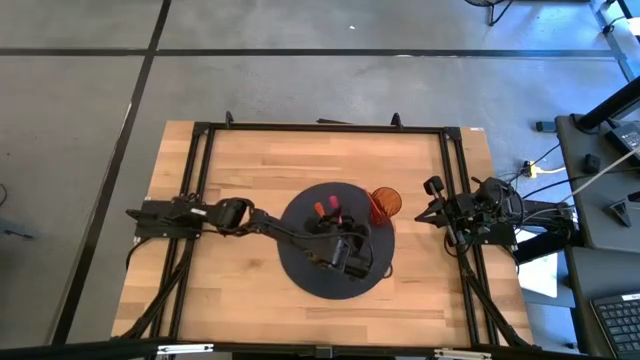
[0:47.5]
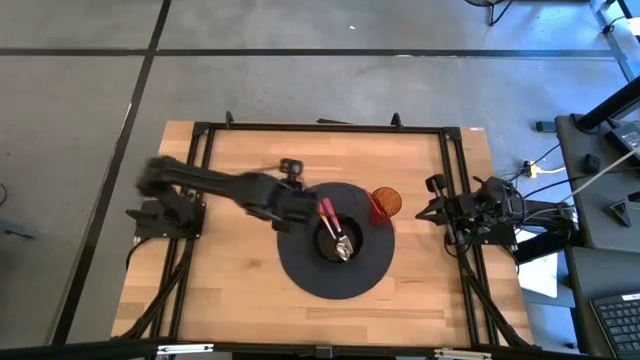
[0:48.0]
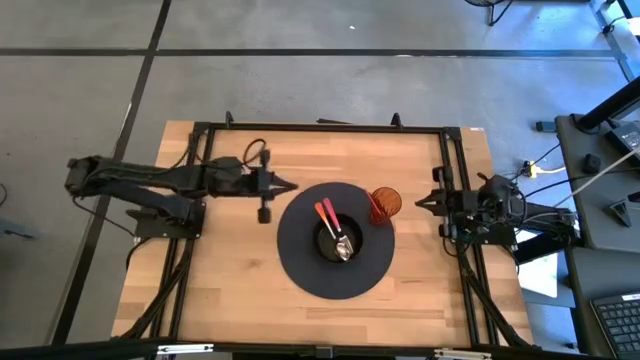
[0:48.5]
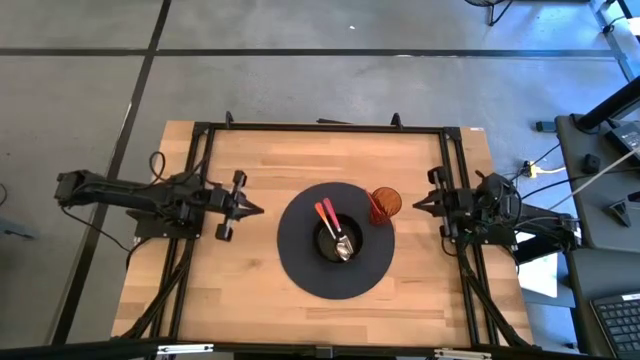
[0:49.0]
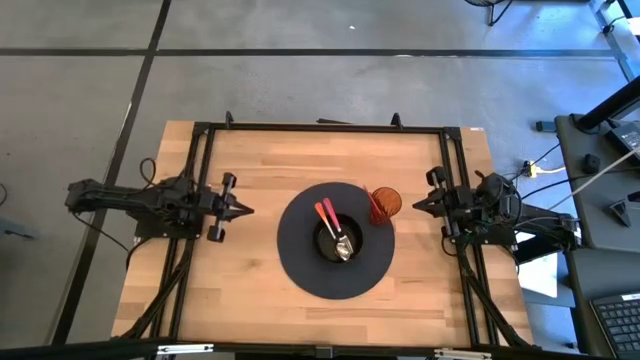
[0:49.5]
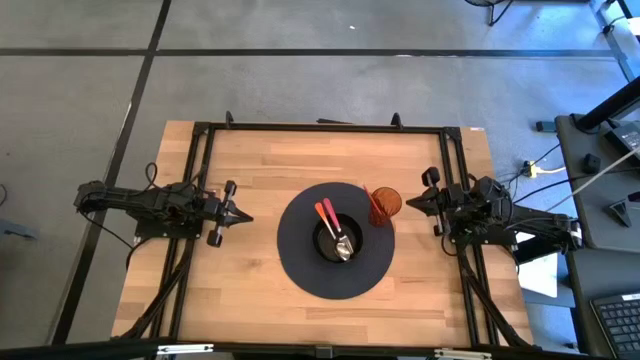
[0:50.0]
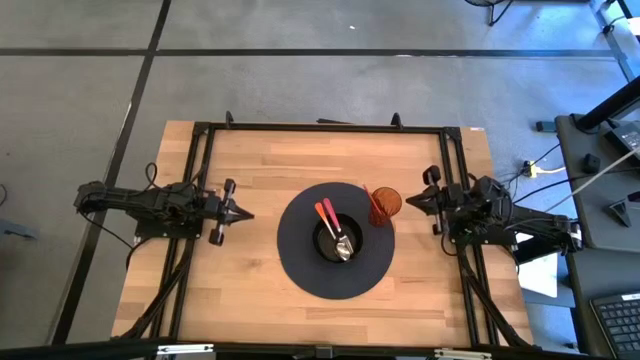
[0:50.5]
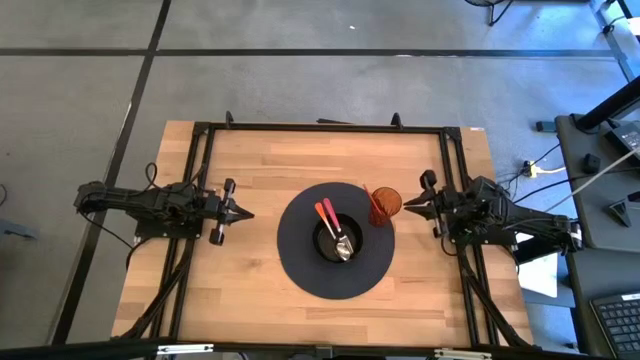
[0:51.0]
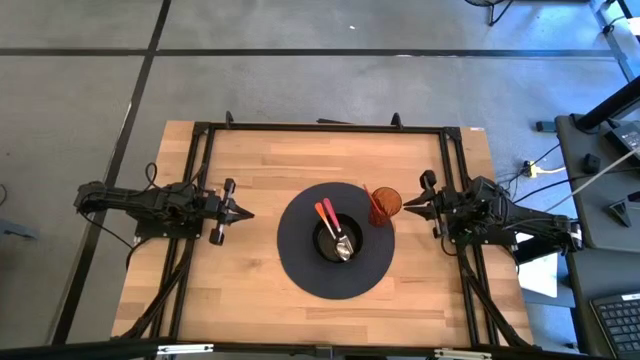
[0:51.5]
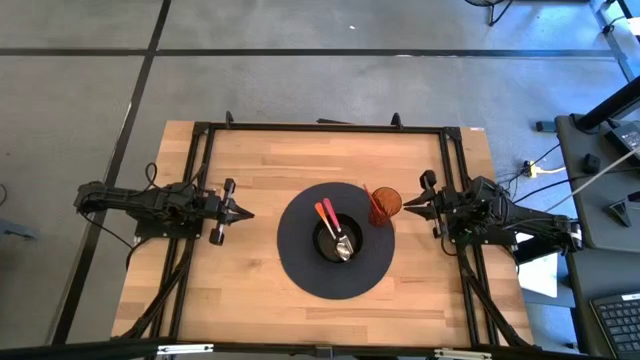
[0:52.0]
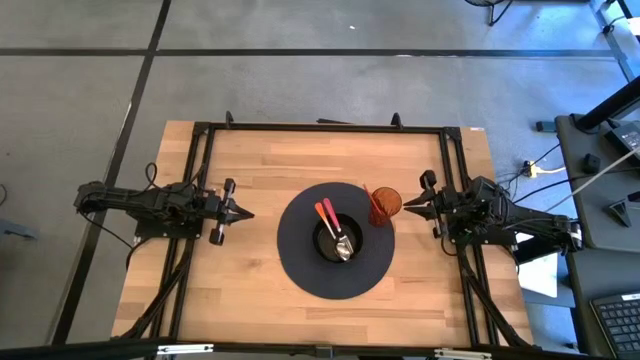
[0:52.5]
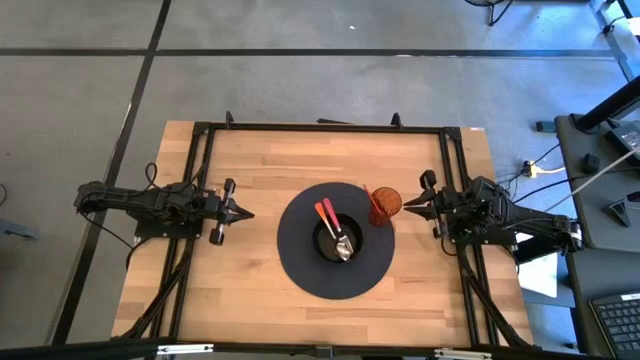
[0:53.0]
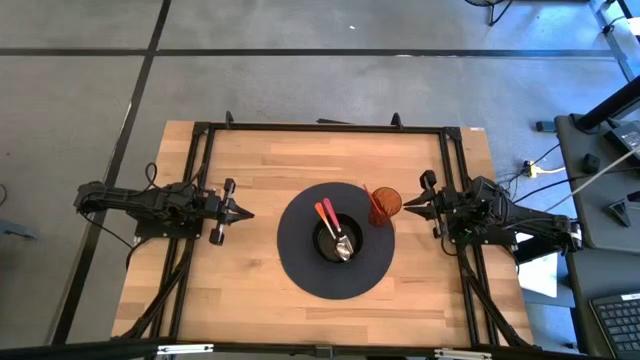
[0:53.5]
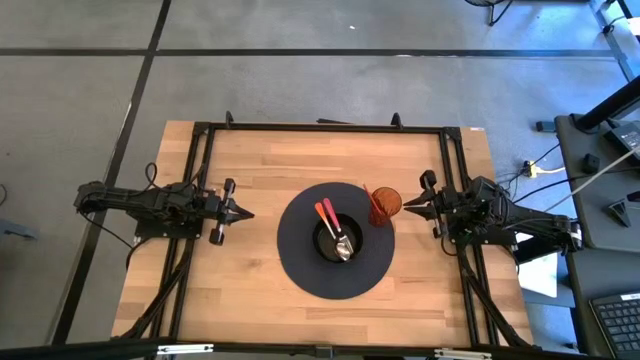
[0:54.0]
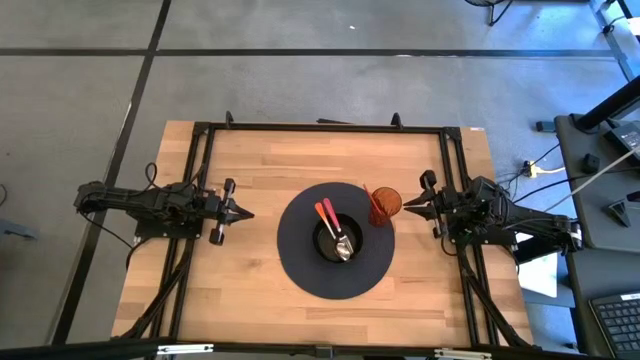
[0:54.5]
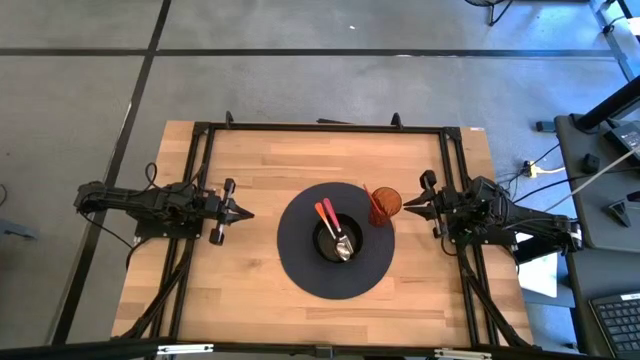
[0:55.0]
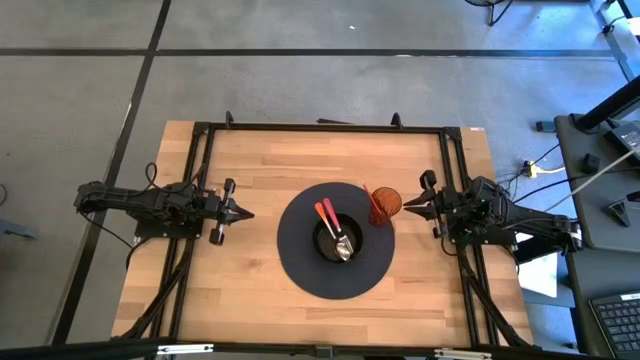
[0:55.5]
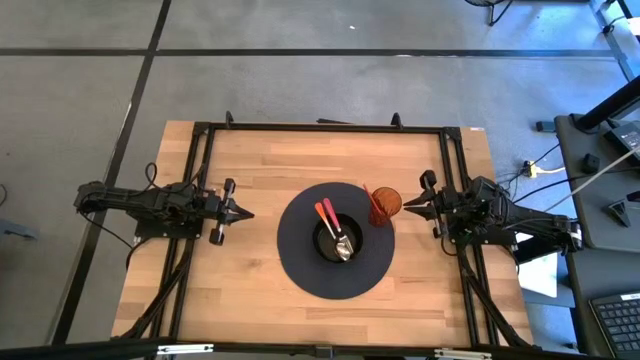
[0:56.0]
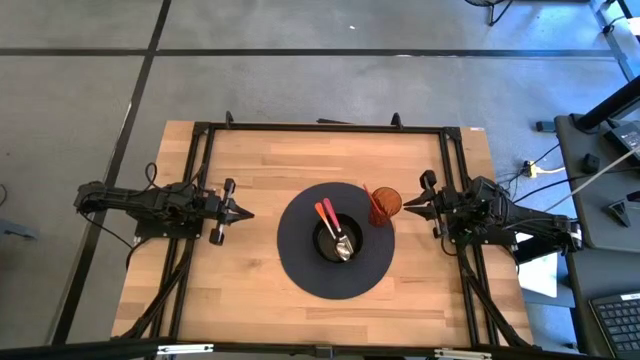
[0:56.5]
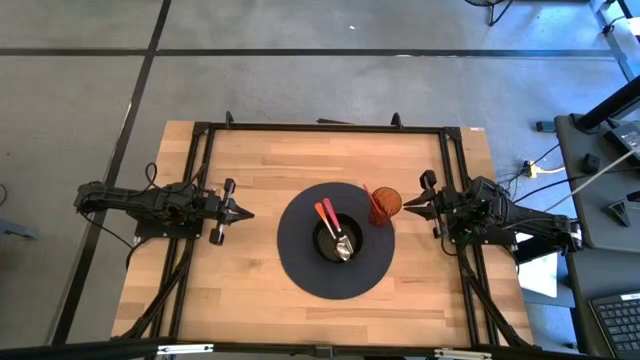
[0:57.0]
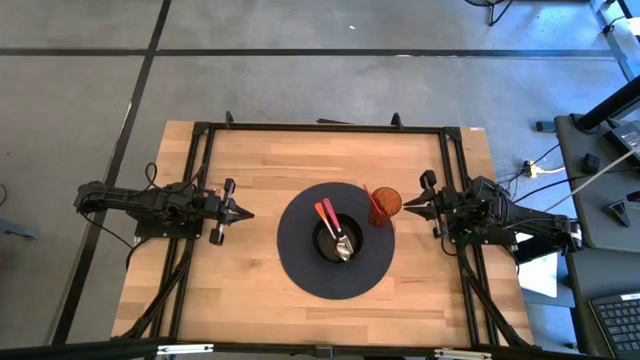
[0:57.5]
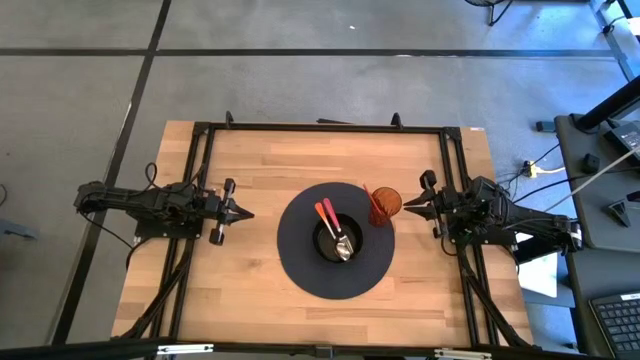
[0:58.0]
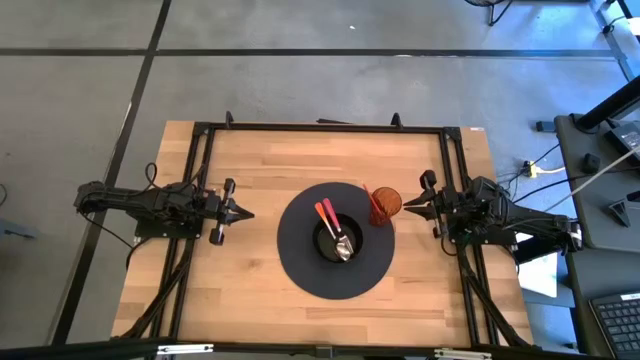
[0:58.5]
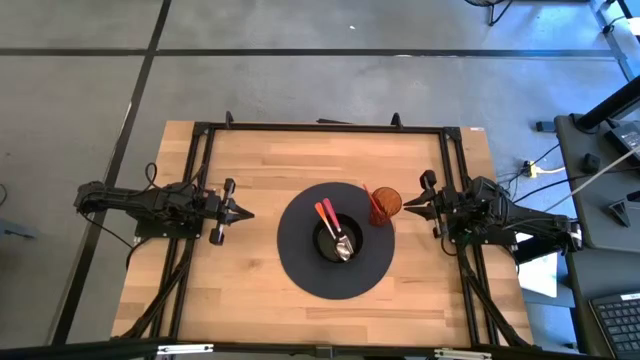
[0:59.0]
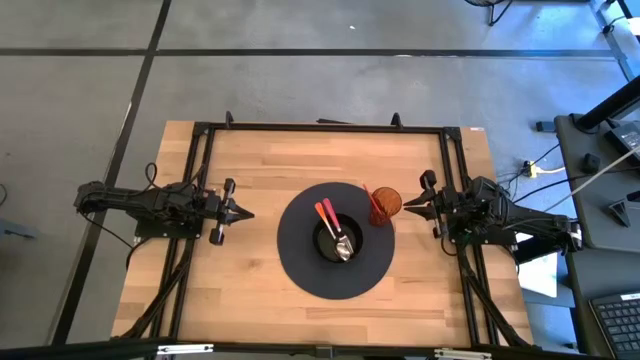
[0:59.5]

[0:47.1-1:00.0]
Task: Pick & Place Utensil
Return to Home Position

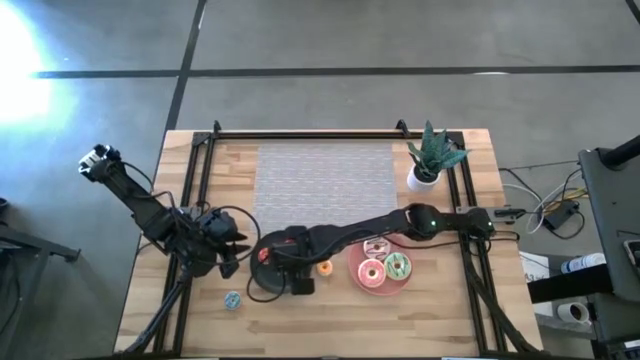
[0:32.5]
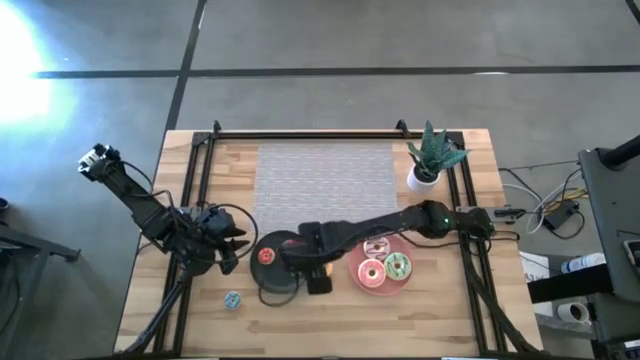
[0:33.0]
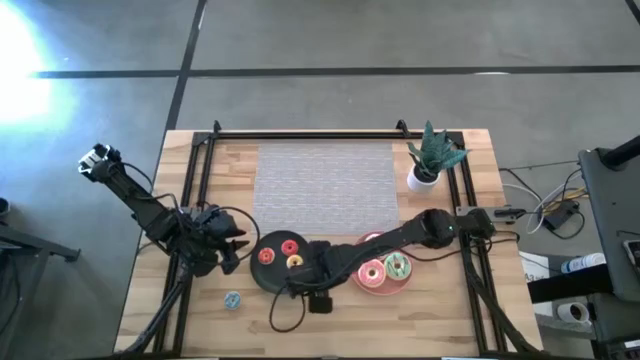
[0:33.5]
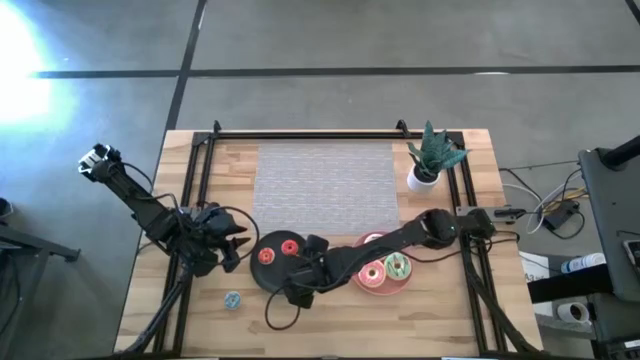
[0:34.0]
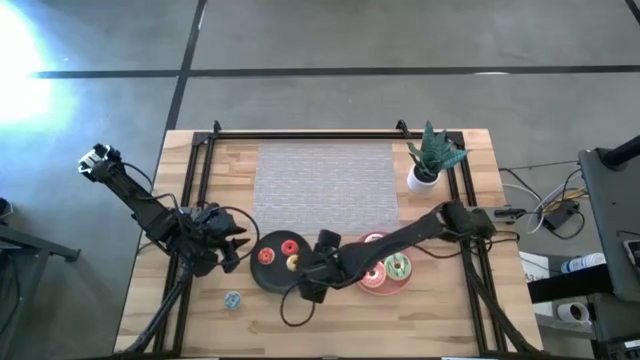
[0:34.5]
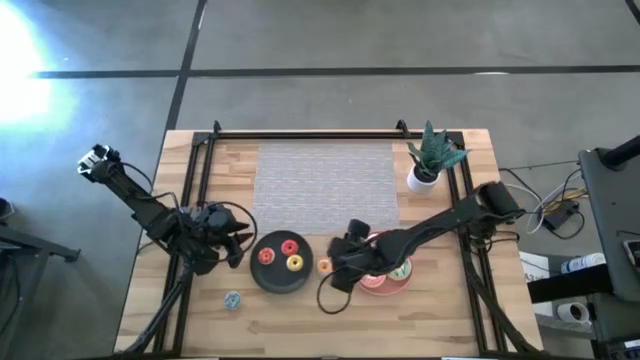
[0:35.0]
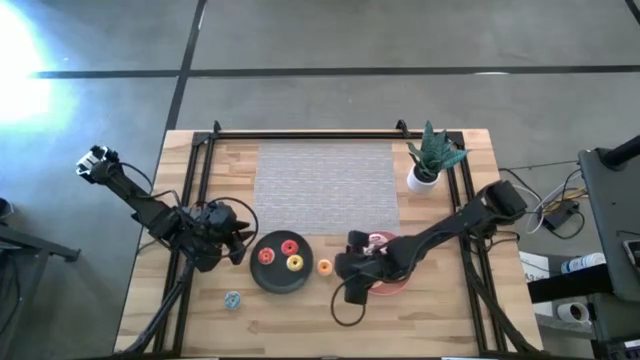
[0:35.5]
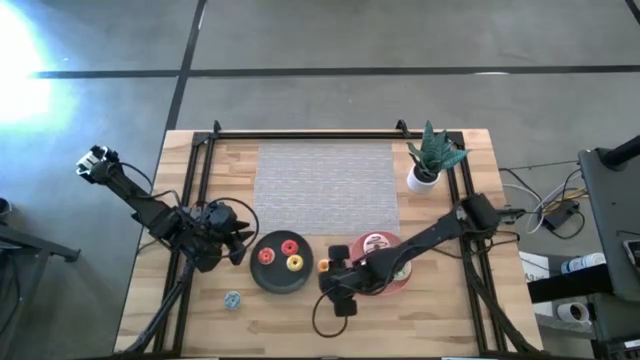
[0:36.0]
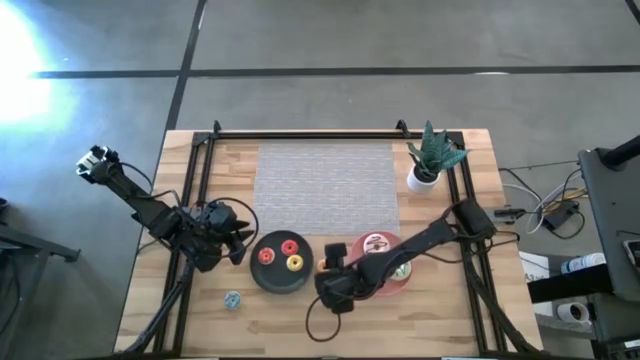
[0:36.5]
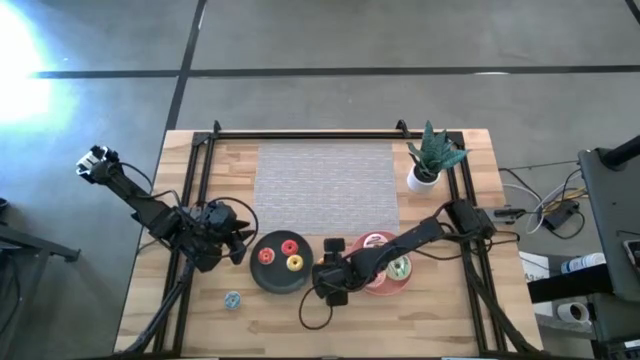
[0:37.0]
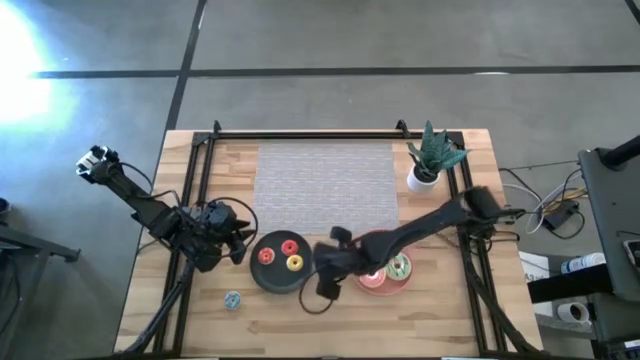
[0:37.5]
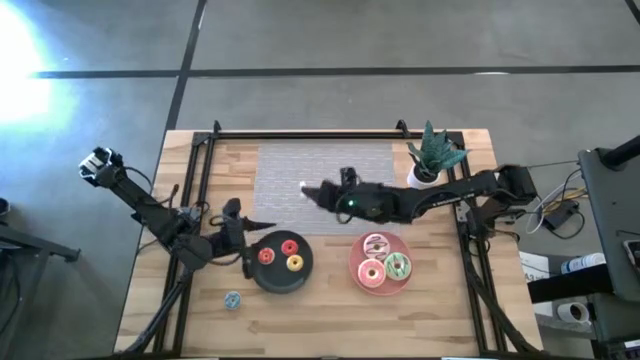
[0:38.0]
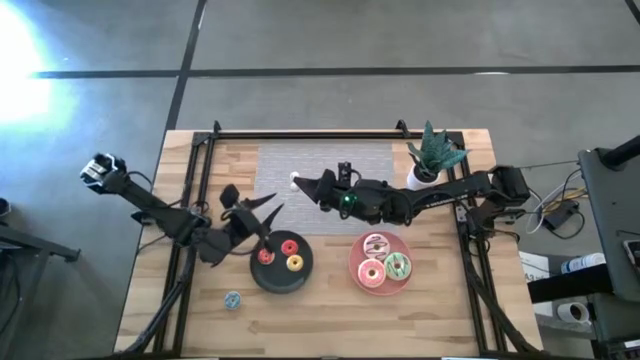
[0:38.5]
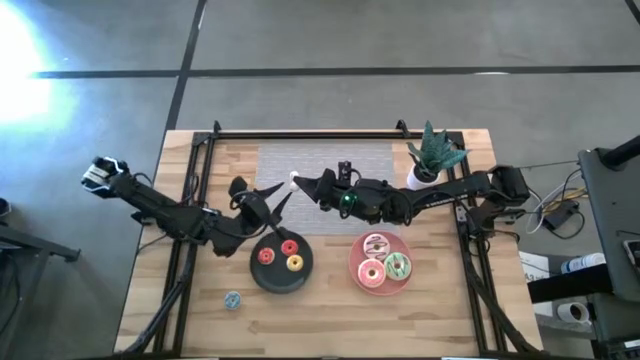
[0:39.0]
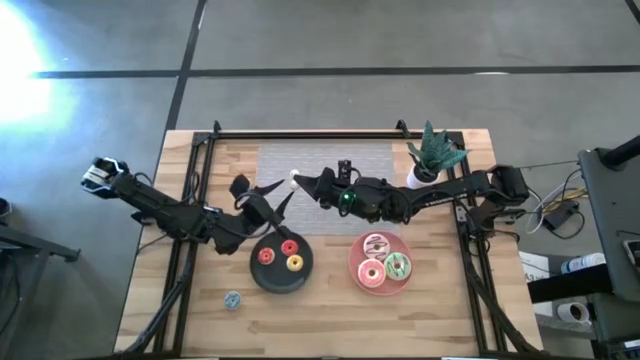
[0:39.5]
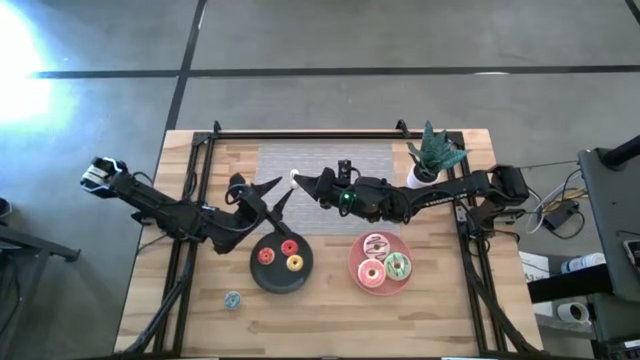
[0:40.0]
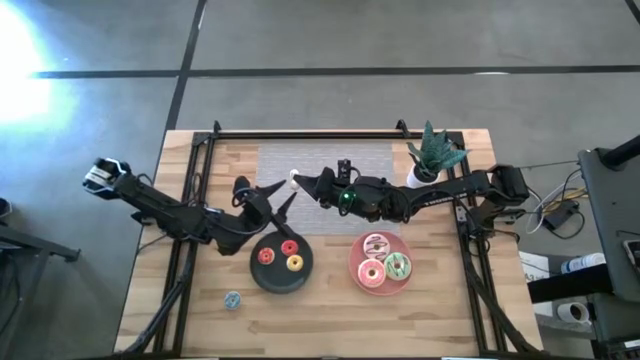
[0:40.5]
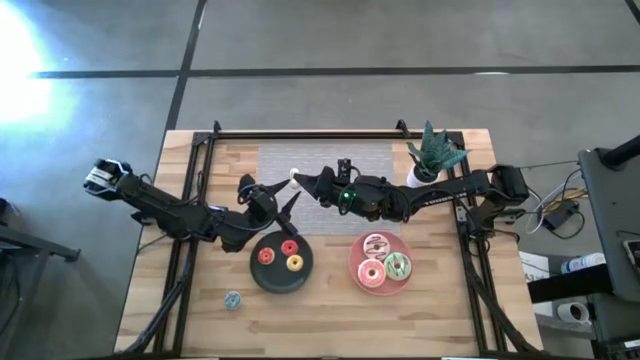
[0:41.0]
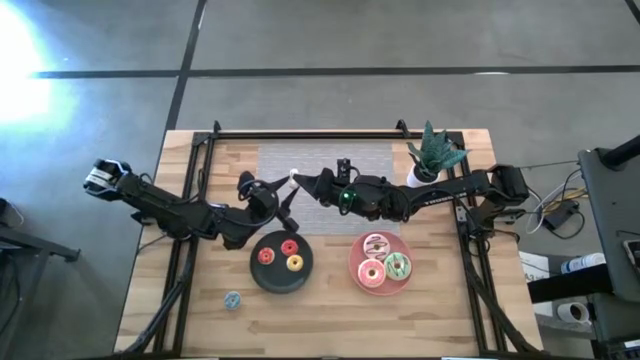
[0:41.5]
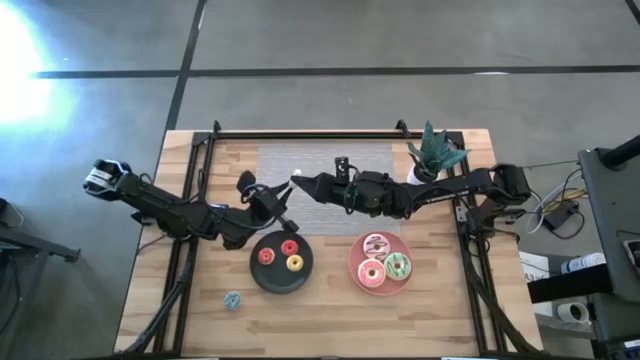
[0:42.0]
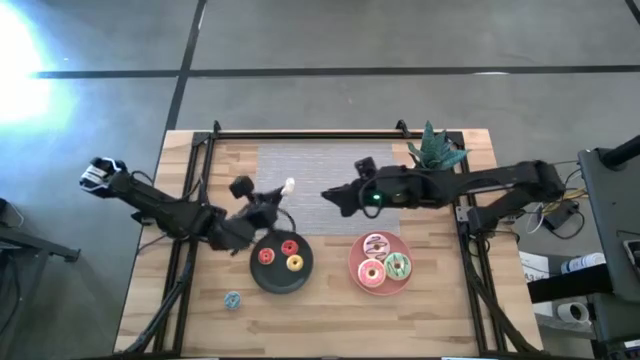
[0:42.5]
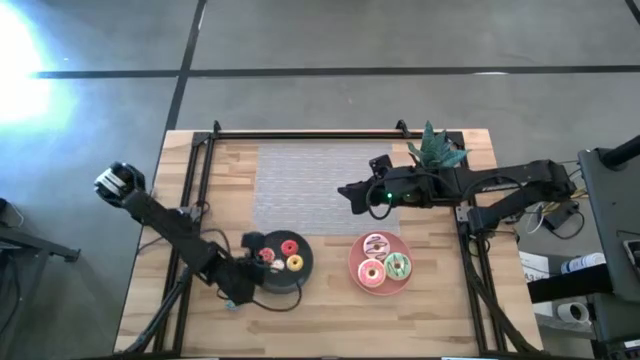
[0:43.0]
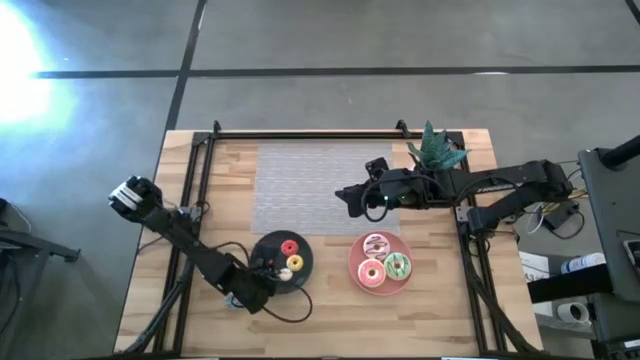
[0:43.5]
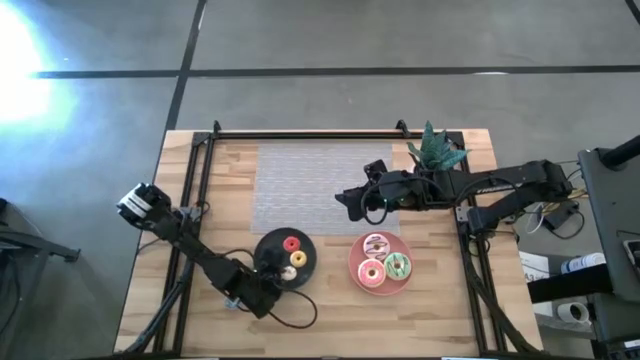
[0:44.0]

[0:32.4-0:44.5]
Task: Pick & Place donuts
Put the small white donut on the black plate
